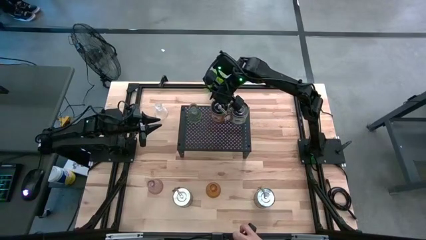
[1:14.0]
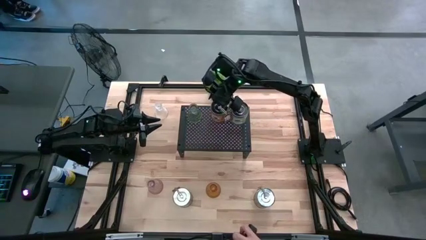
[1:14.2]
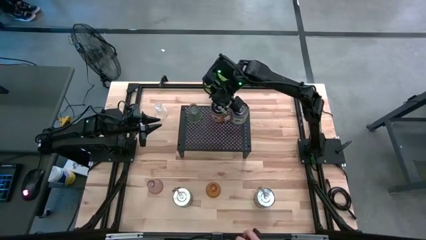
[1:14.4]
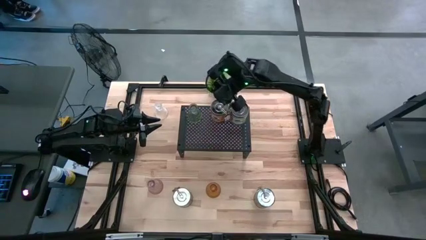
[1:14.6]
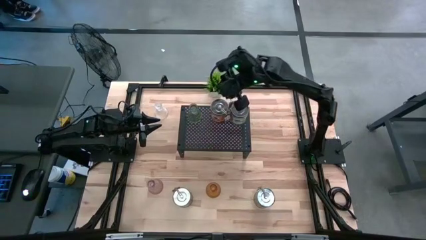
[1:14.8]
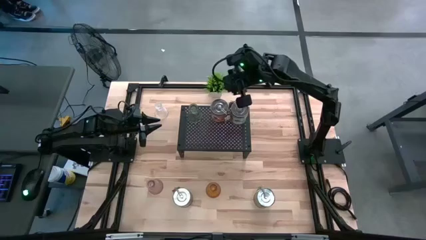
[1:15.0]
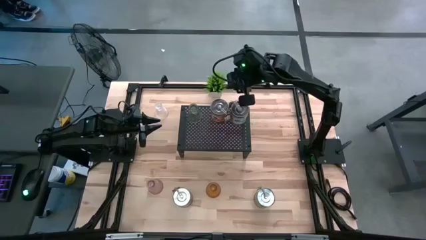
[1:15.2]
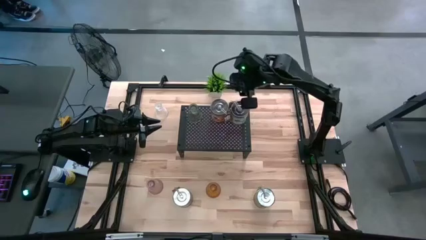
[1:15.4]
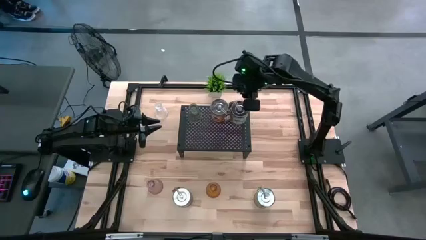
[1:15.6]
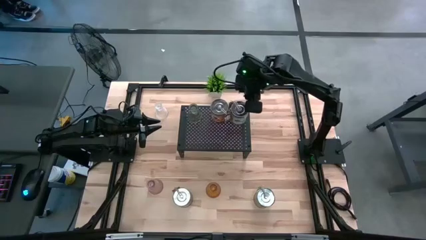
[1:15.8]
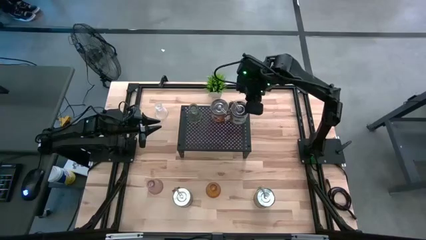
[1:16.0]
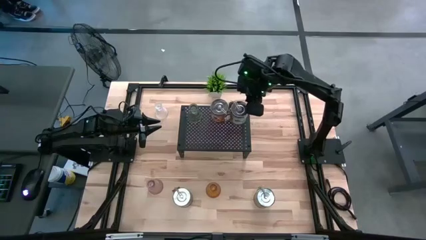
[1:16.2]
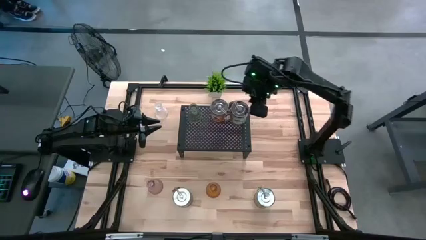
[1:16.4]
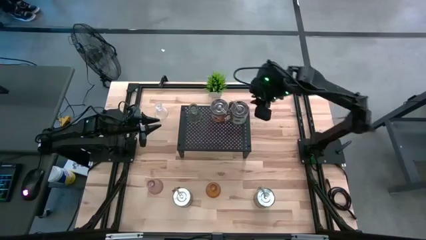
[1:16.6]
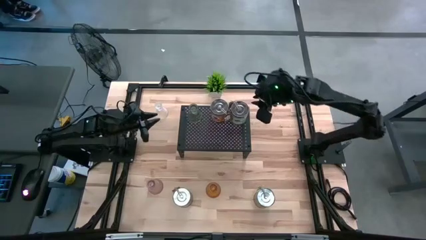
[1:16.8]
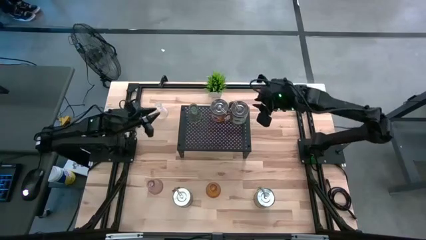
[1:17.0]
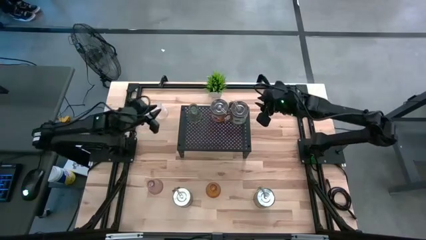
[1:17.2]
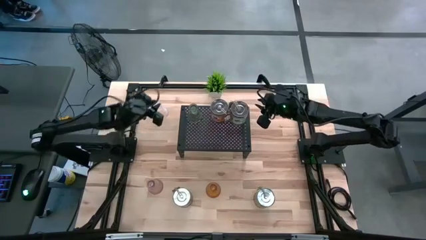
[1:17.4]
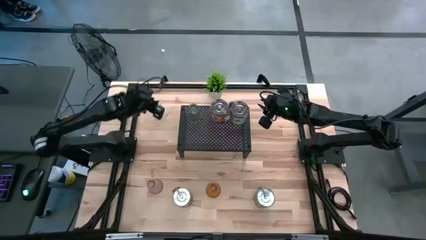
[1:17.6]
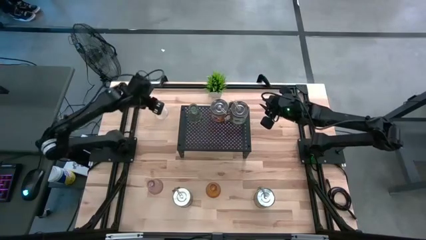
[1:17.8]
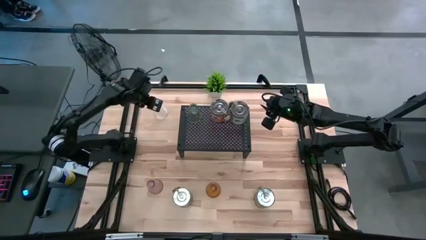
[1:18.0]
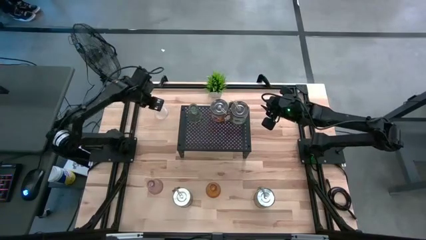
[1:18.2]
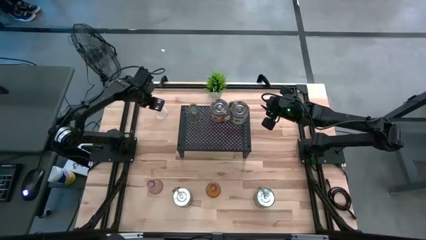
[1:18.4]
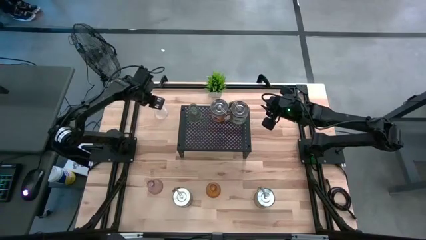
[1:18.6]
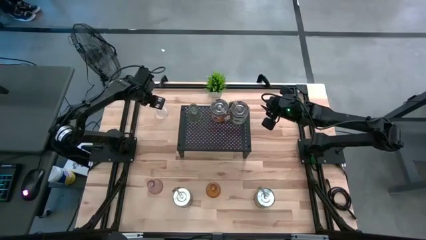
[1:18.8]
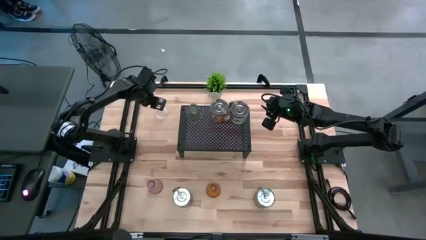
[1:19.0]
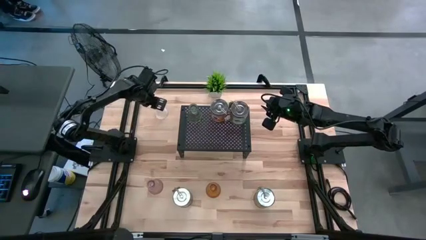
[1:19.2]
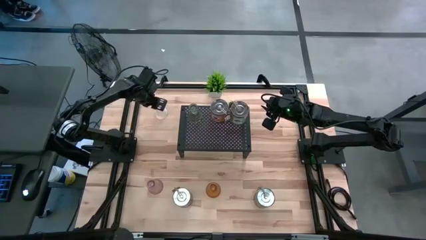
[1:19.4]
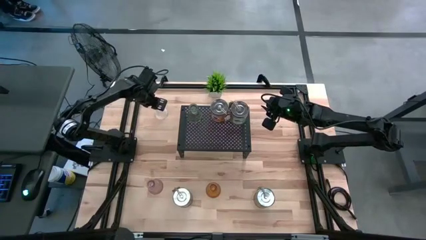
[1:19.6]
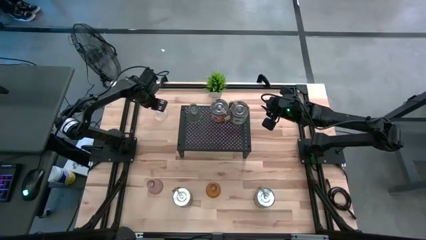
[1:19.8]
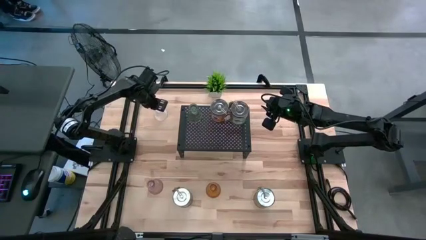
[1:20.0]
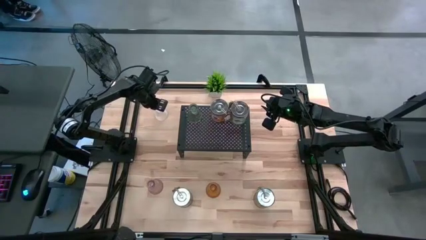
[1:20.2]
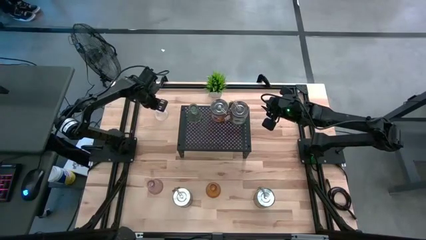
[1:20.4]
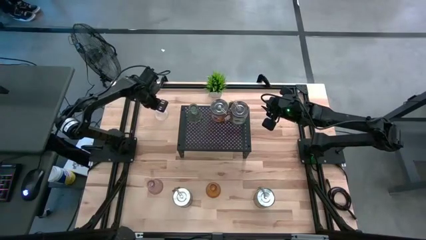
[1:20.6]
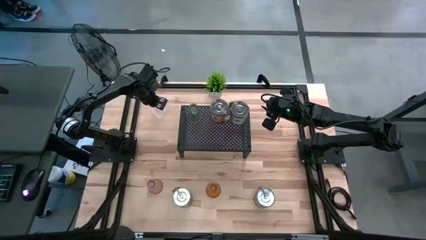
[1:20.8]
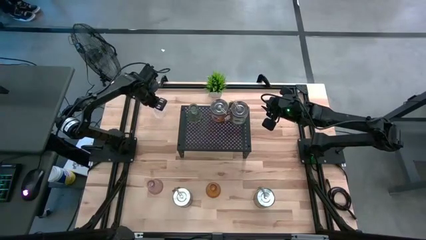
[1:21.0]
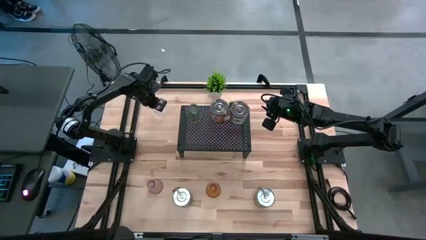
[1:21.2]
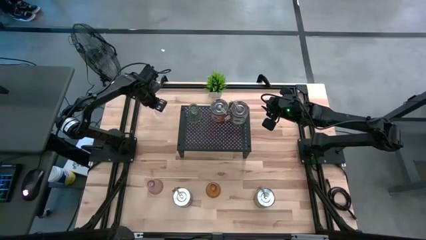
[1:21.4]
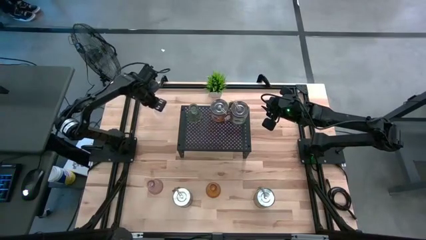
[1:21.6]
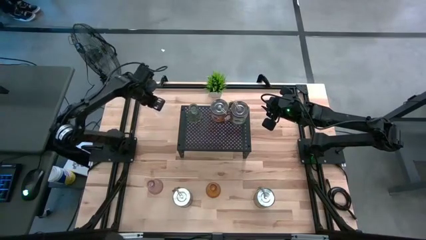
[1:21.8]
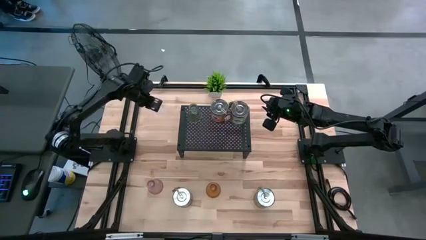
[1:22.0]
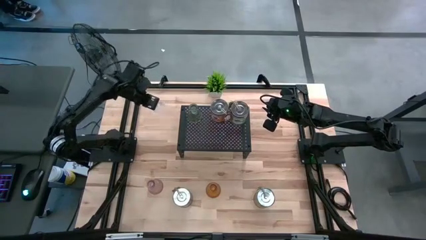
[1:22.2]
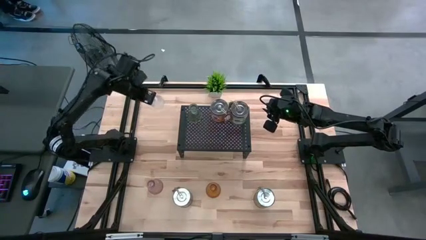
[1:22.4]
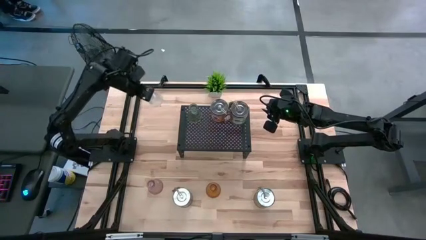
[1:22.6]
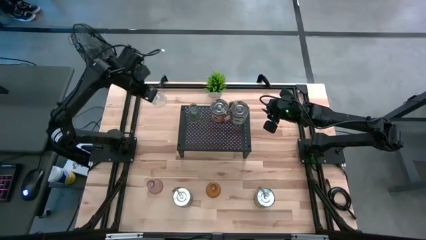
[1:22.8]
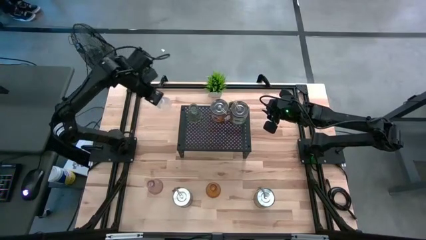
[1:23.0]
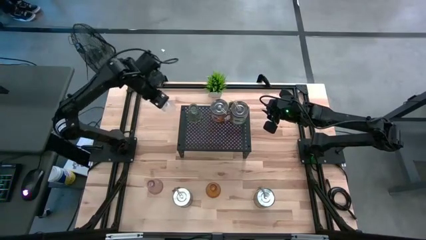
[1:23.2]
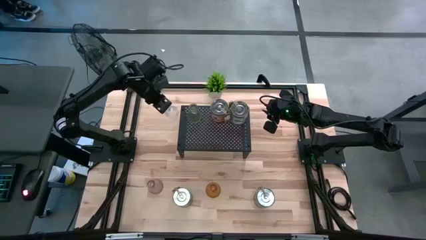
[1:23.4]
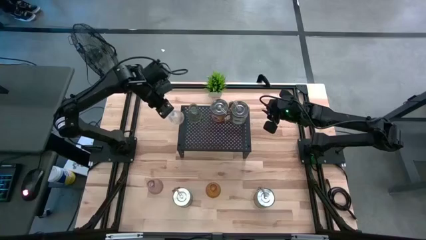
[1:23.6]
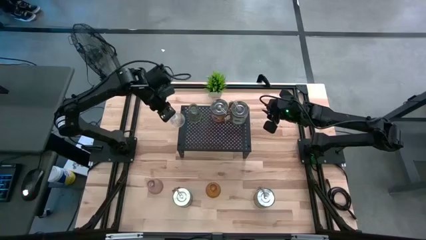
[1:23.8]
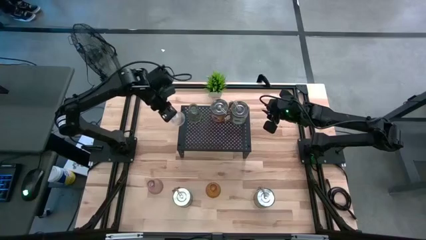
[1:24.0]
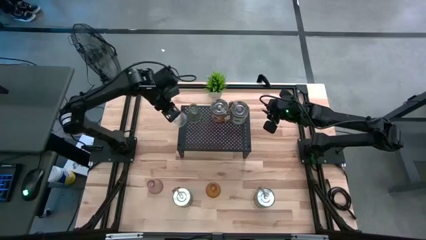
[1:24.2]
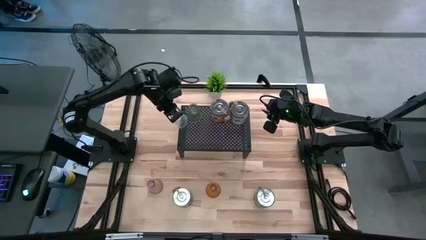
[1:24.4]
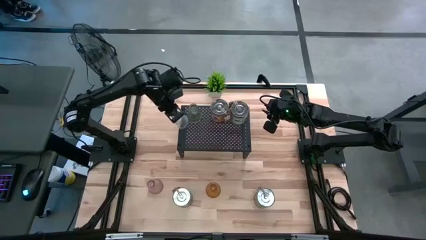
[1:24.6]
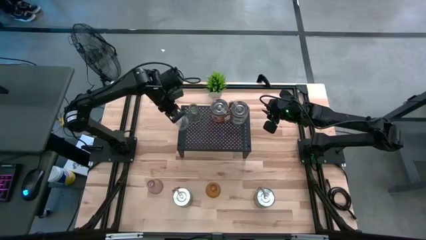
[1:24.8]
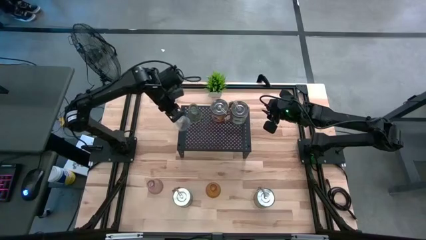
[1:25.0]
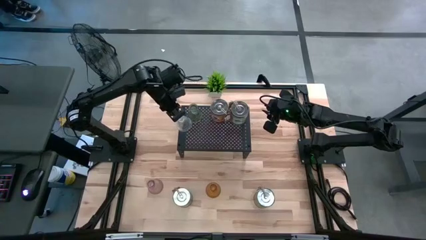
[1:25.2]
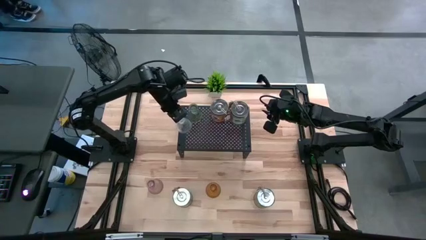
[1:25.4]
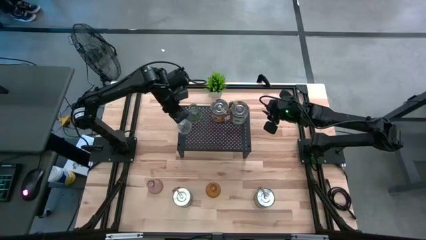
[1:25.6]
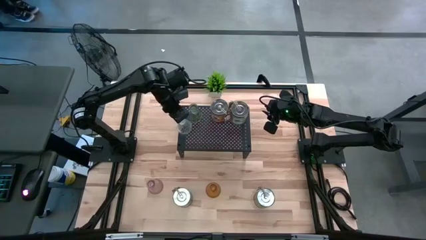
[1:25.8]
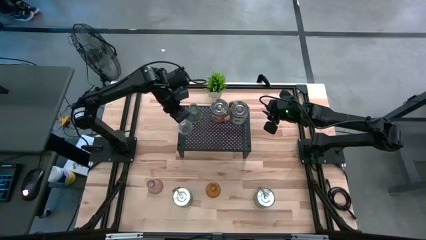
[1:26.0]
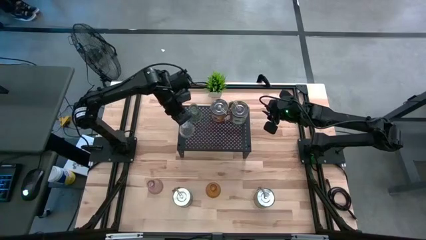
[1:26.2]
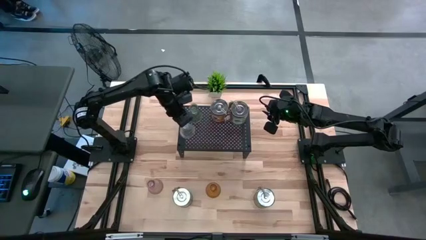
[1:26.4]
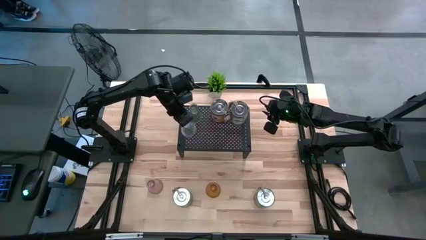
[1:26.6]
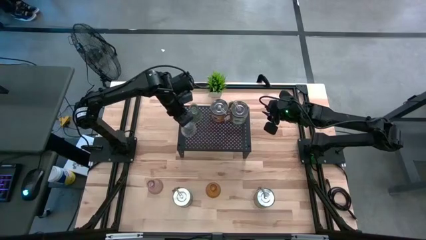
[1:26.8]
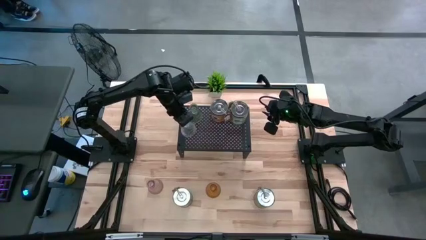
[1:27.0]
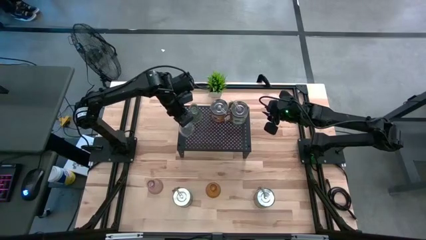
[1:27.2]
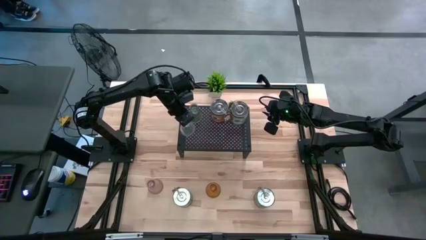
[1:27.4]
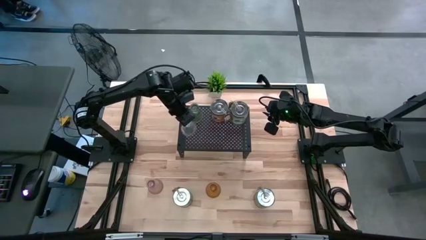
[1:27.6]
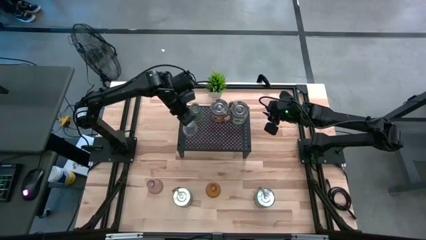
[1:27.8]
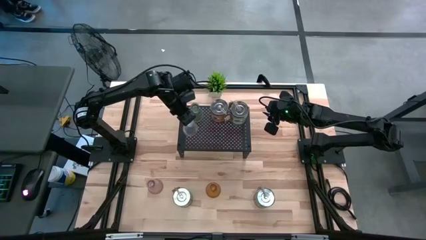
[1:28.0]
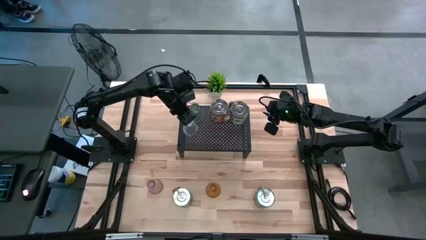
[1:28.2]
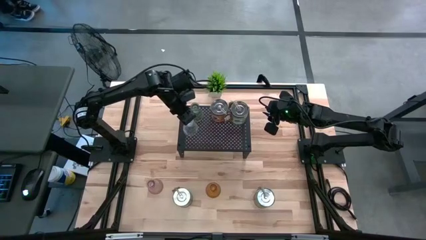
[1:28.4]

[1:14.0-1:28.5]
Task: Pick & Place candle stick holders
Put the transparent glass candle holder on the shelf
